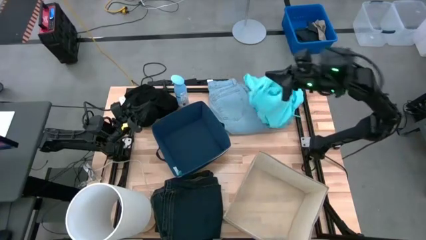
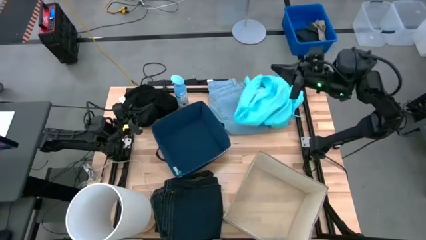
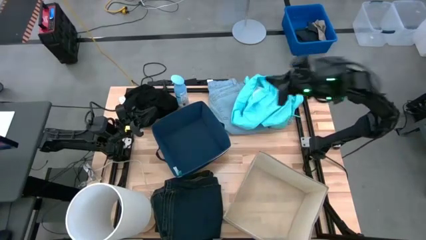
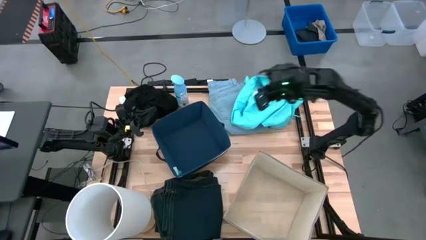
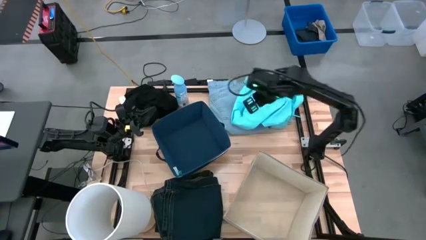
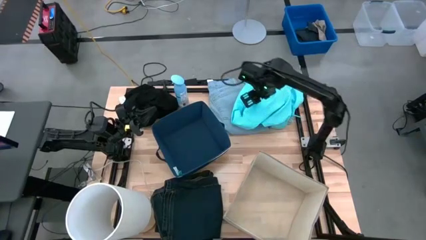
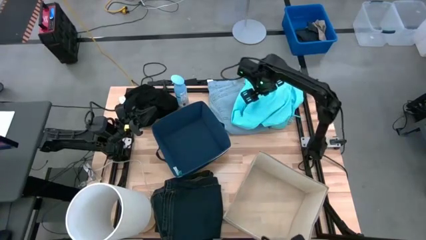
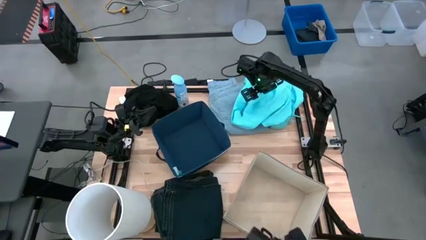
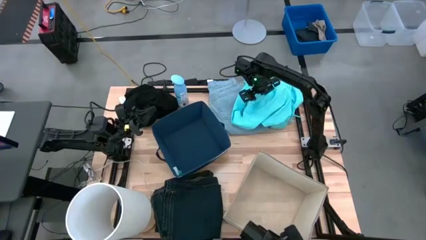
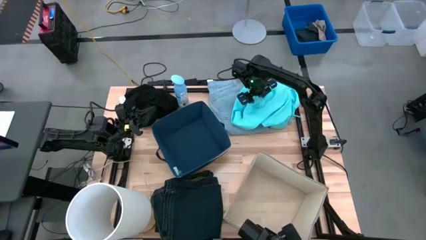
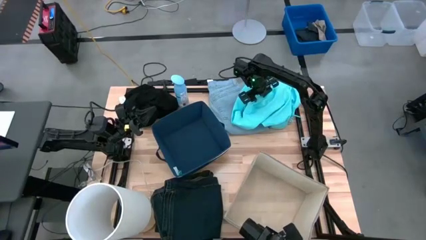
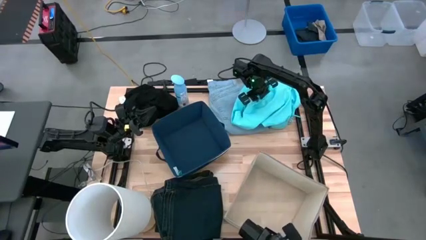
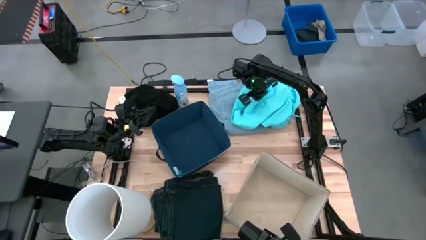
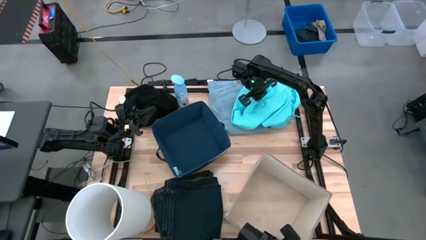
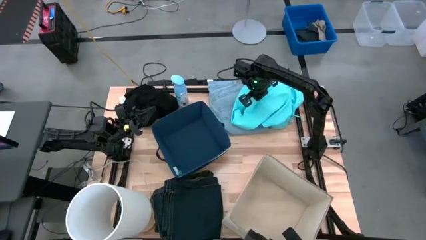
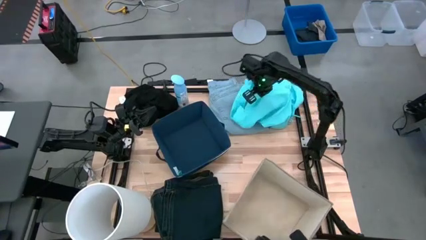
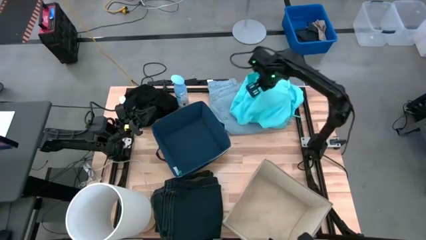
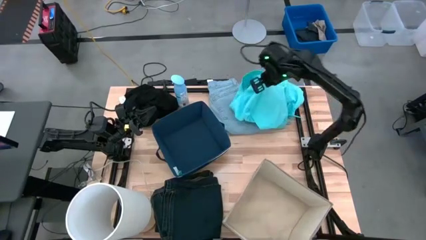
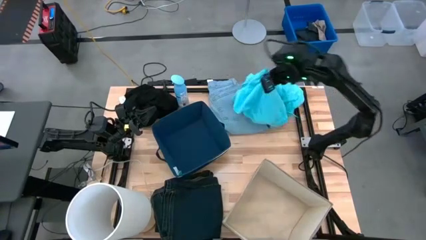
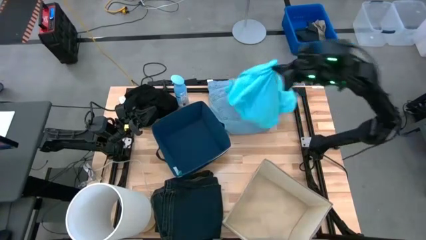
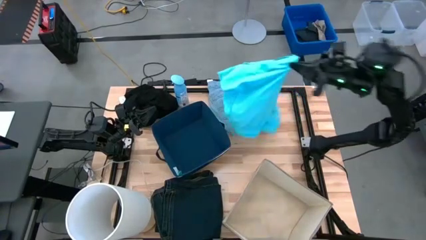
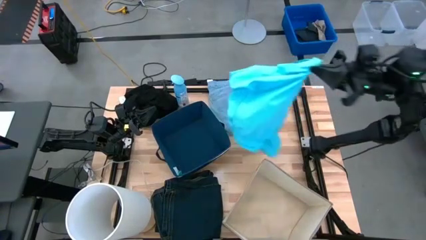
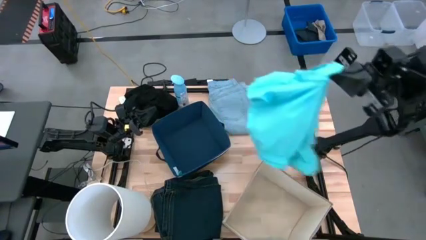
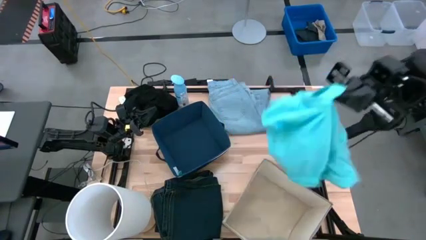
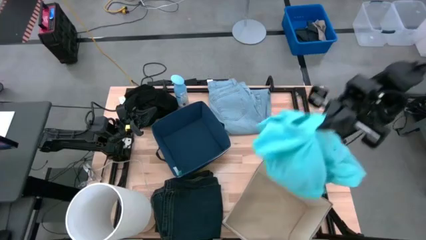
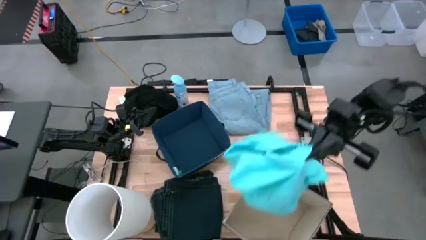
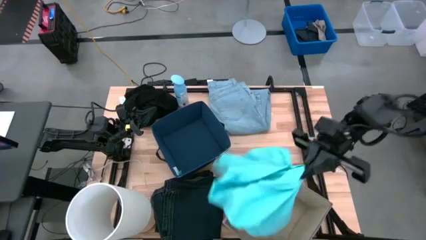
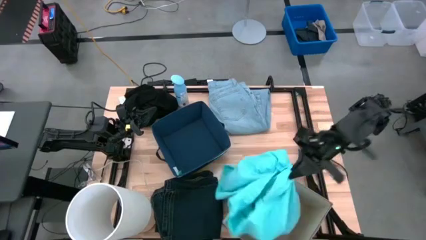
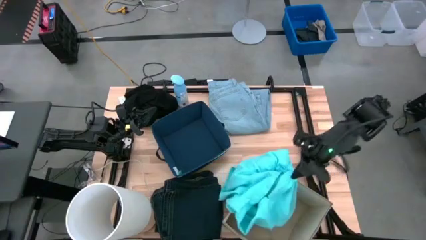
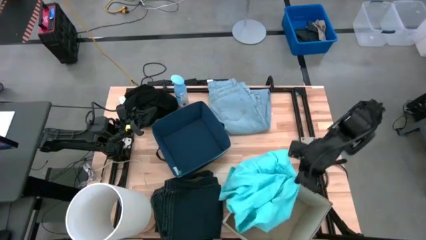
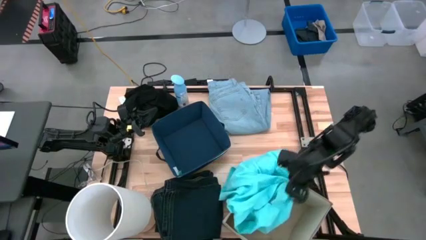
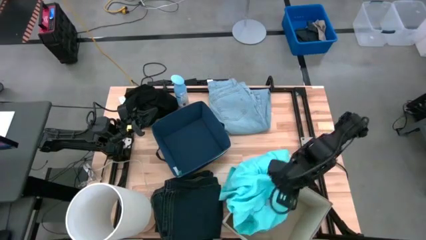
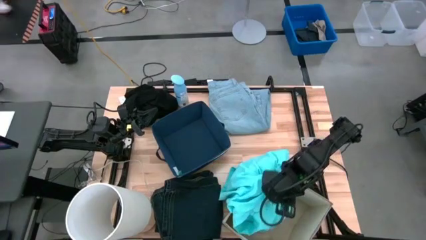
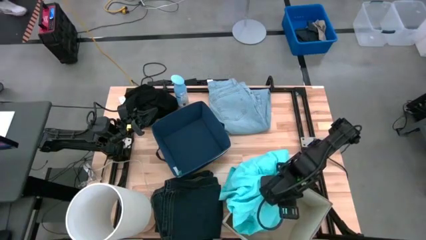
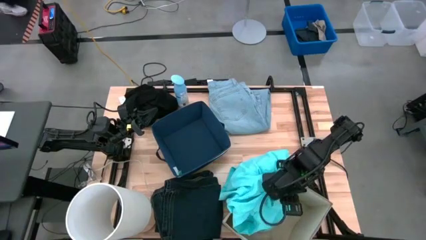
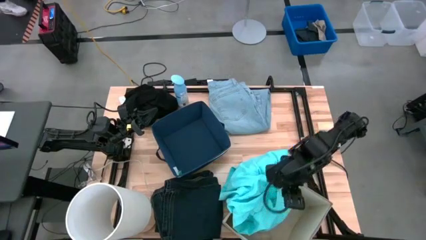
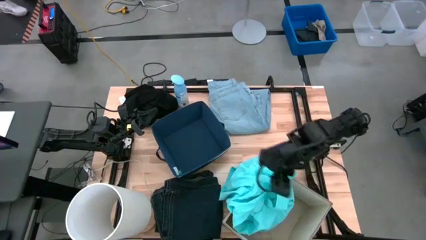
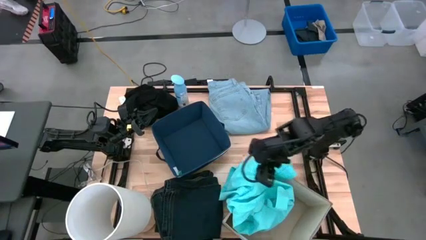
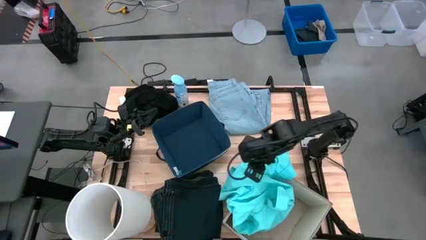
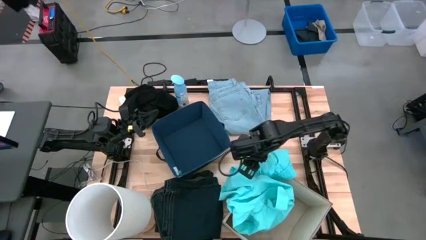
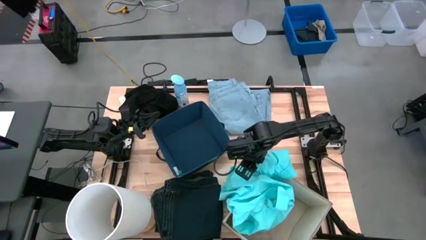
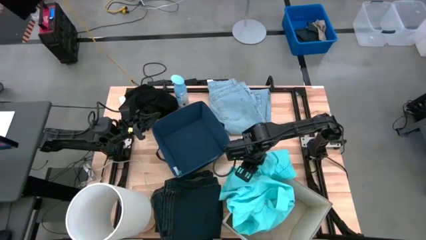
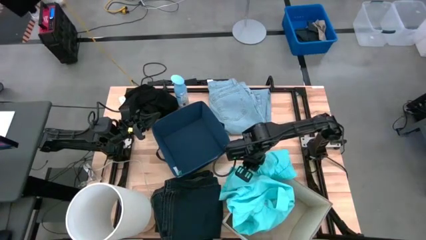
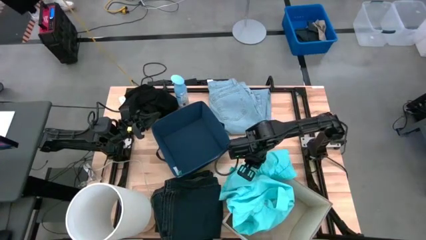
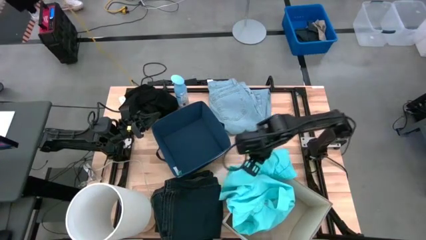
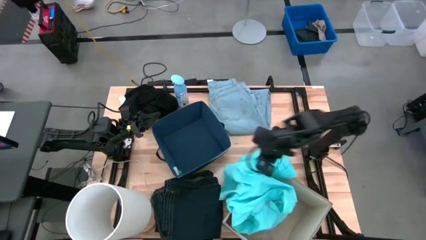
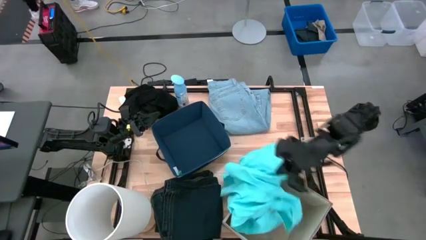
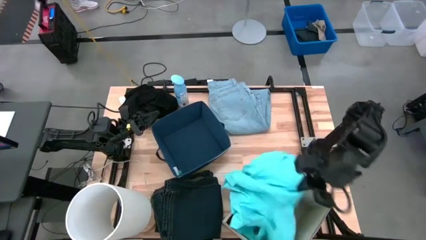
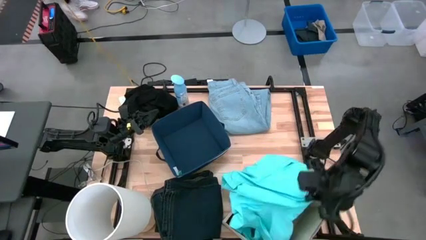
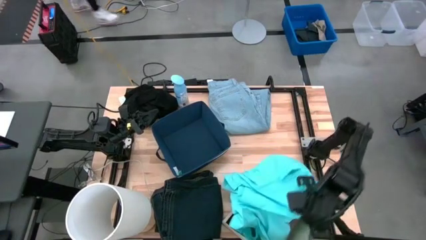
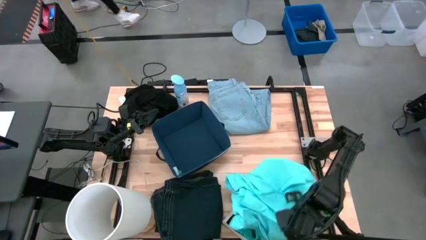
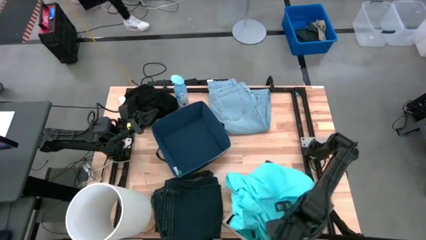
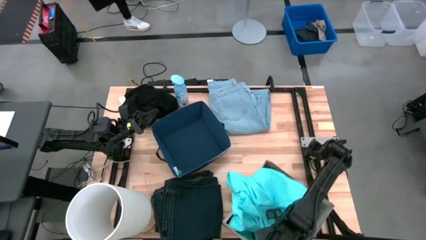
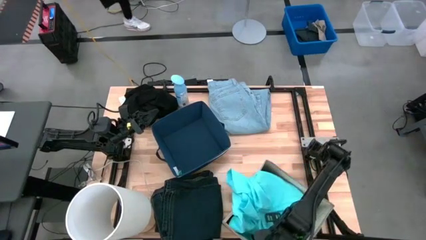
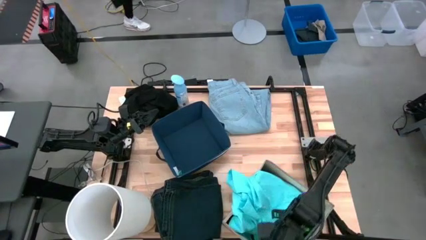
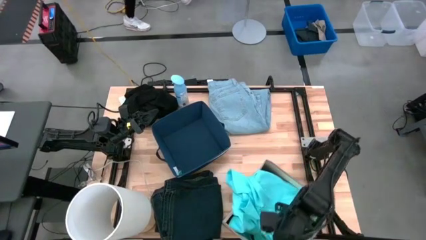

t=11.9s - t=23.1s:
Task: Sort clothes
Put the light blue shorts into the brown laundry organizer

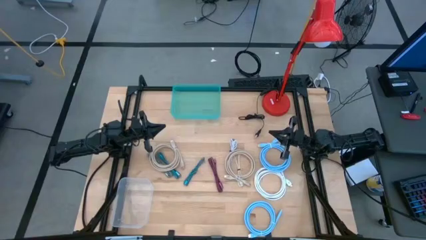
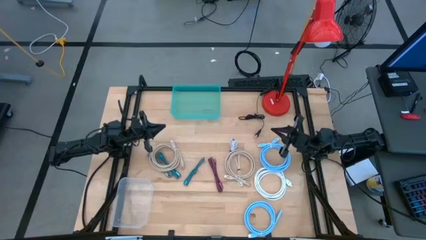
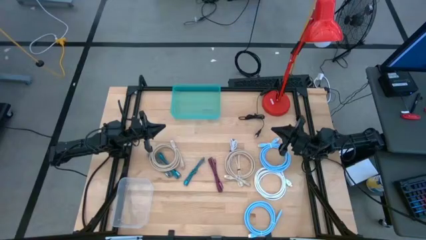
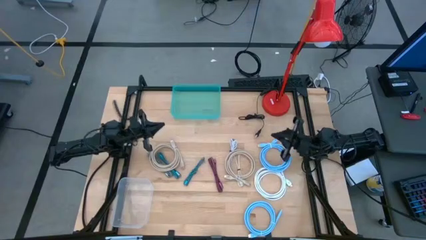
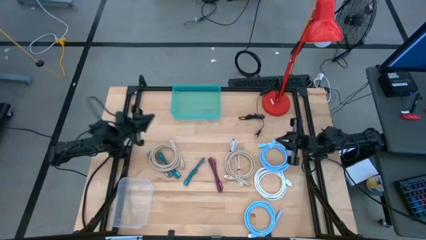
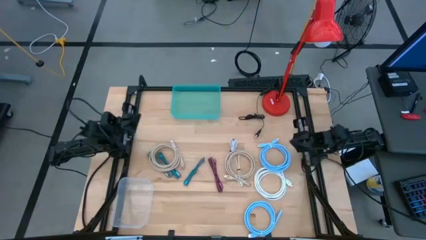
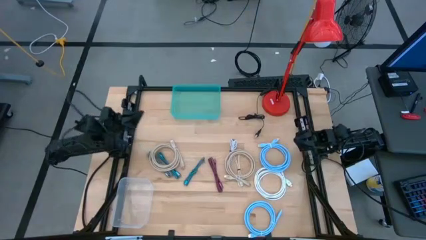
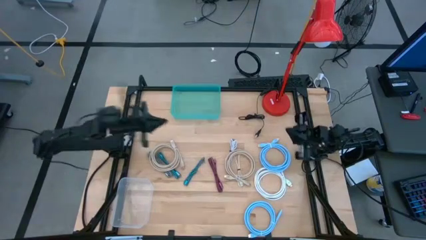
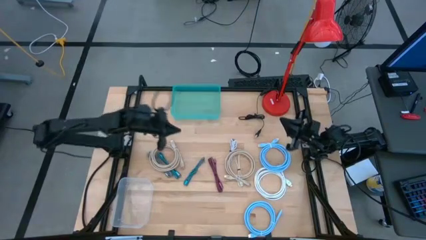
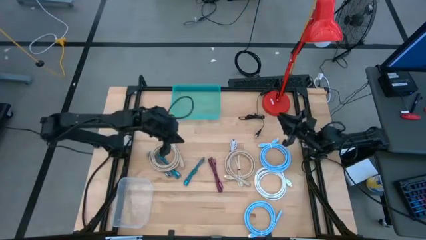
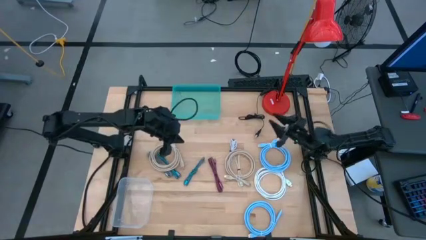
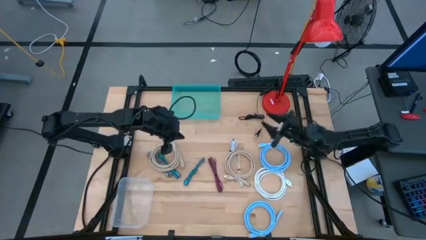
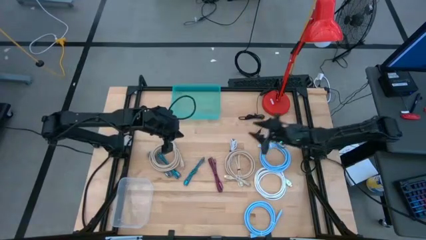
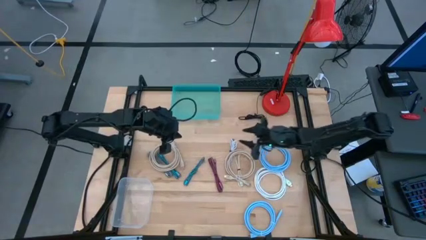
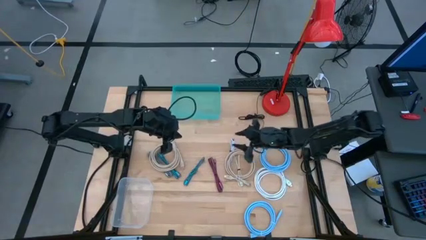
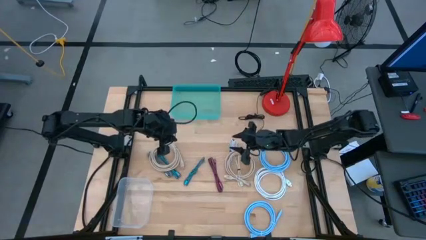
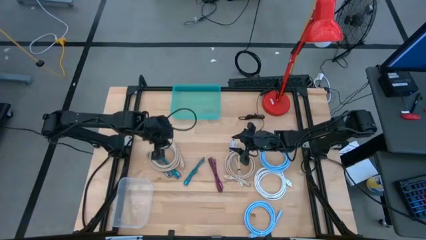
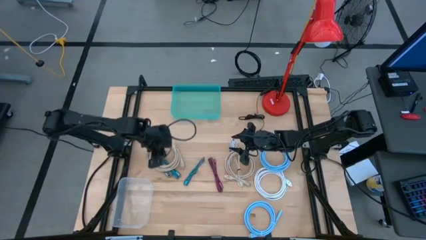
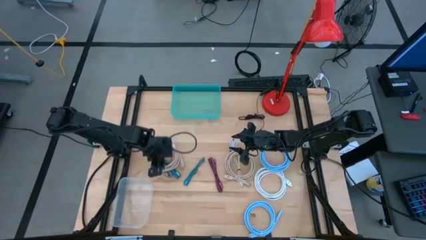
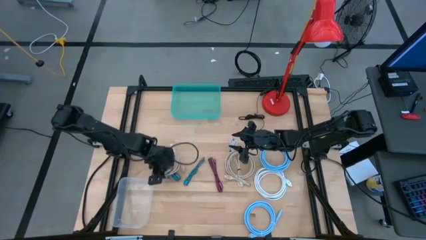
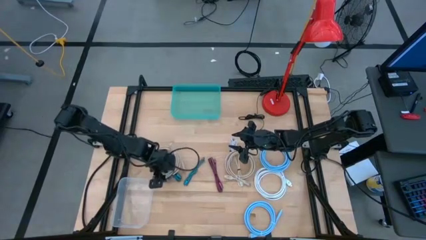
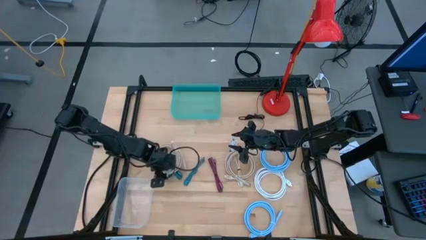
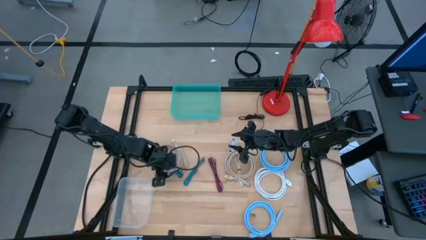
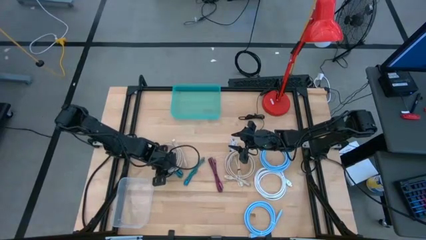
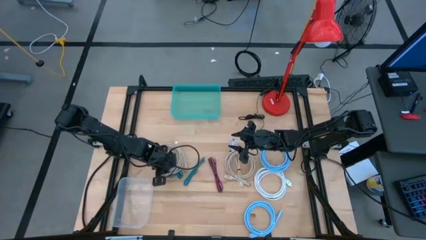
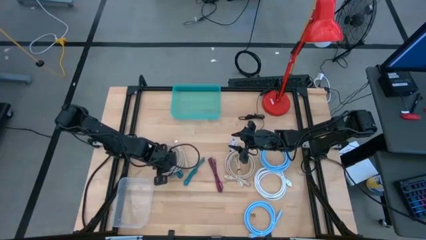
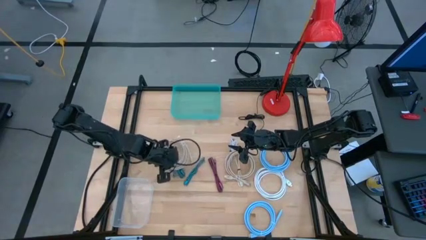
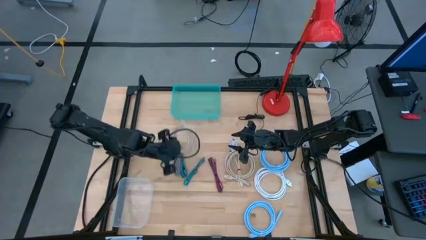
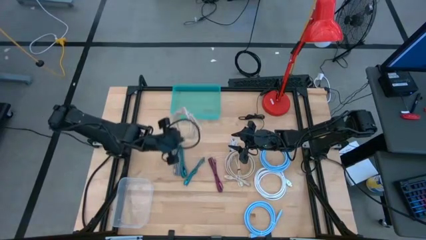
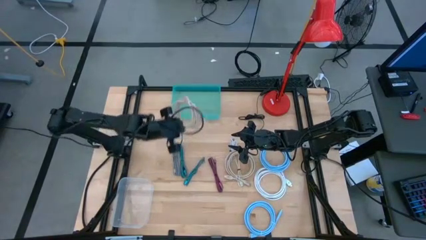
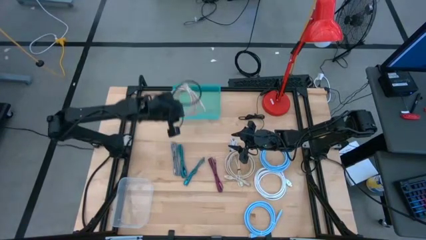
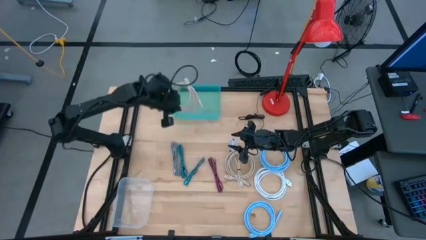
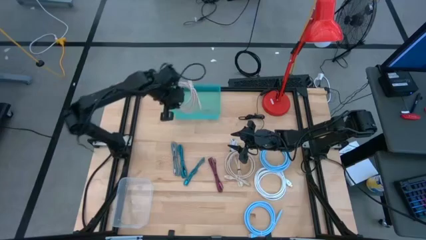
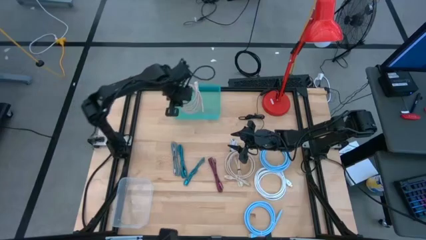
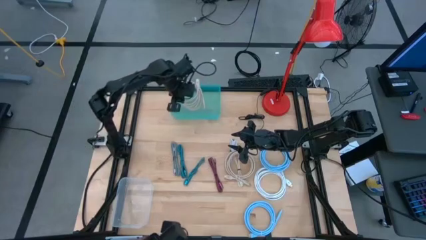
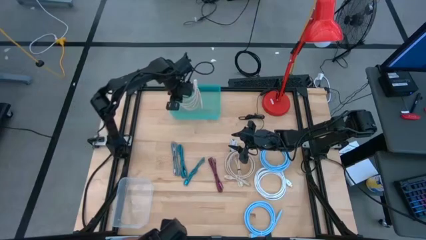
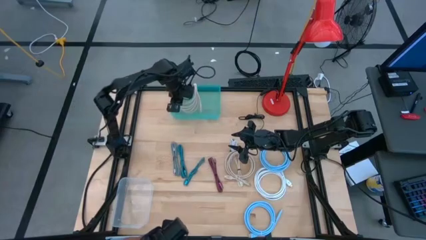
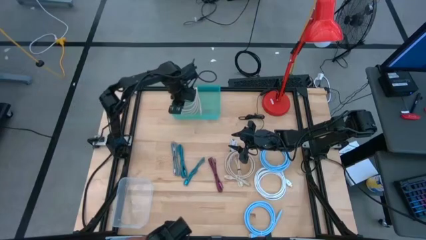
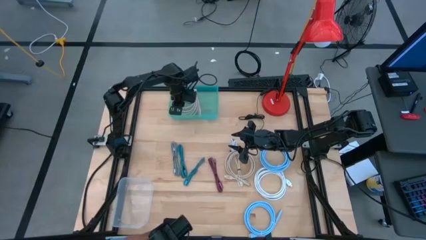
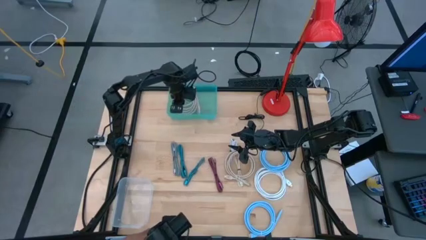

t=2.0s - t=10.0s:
Task: Pick & Place USB Port
Put the left brown HDMI cable into the green bin
